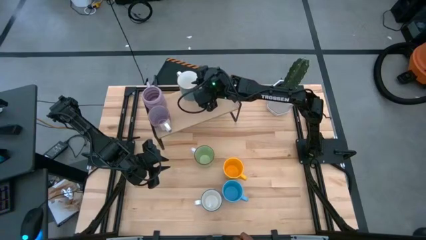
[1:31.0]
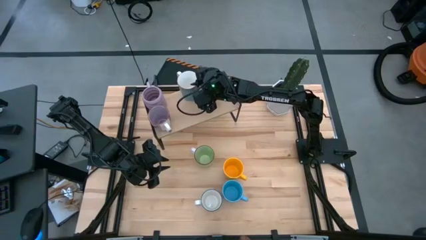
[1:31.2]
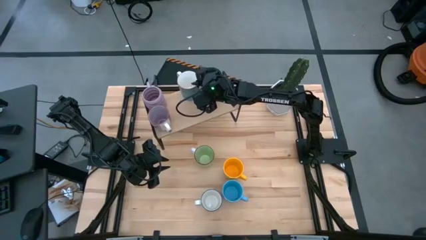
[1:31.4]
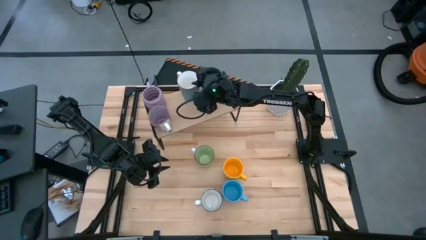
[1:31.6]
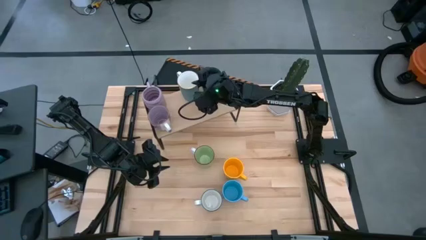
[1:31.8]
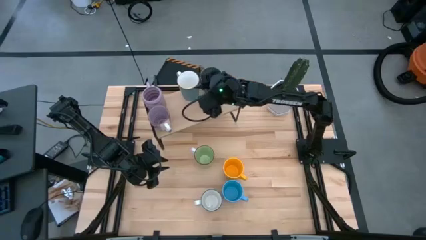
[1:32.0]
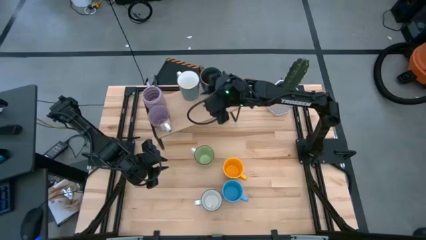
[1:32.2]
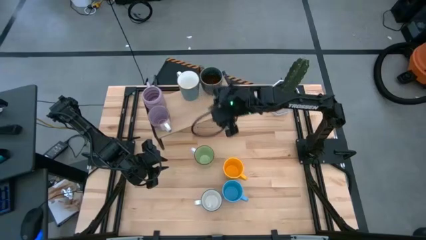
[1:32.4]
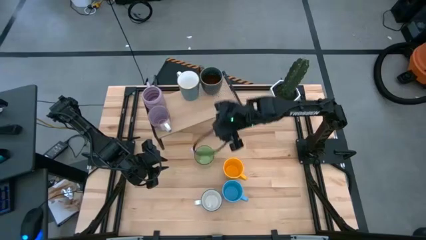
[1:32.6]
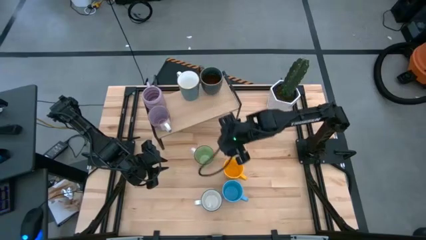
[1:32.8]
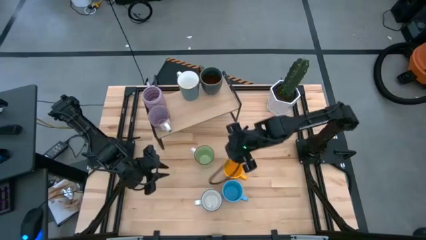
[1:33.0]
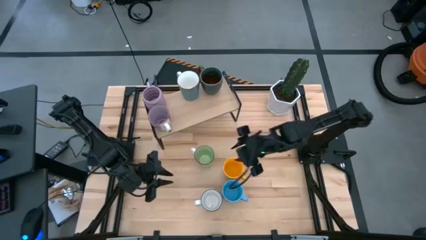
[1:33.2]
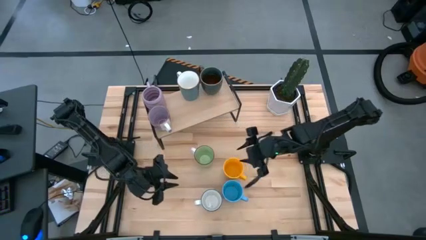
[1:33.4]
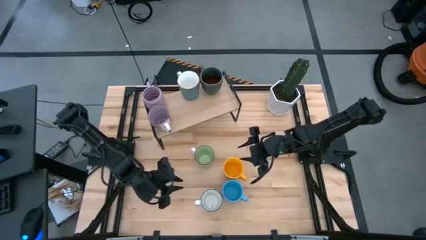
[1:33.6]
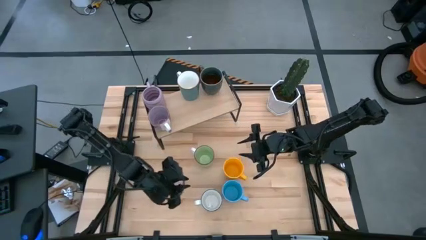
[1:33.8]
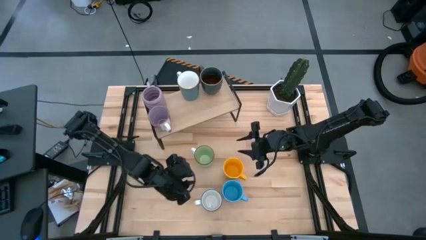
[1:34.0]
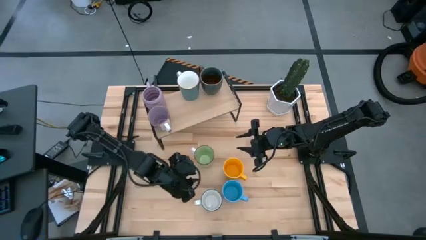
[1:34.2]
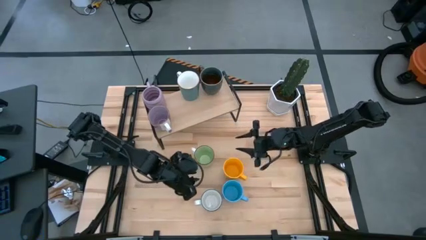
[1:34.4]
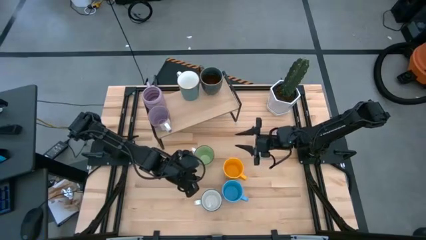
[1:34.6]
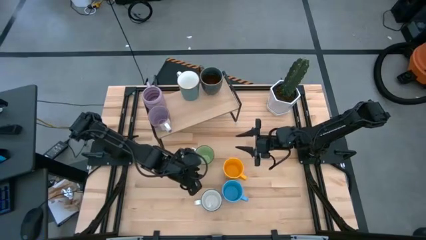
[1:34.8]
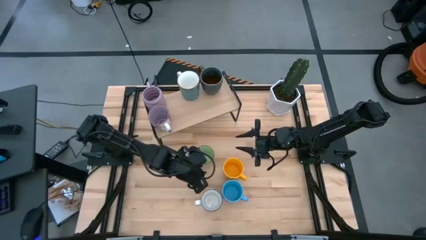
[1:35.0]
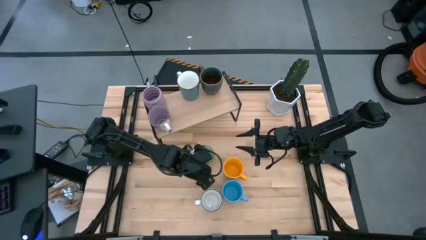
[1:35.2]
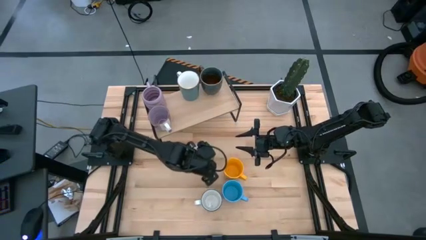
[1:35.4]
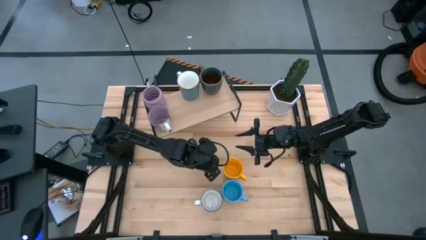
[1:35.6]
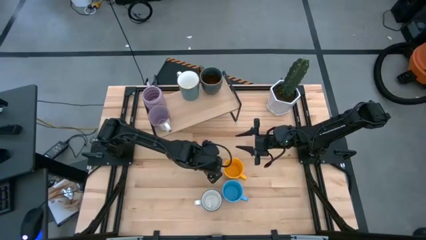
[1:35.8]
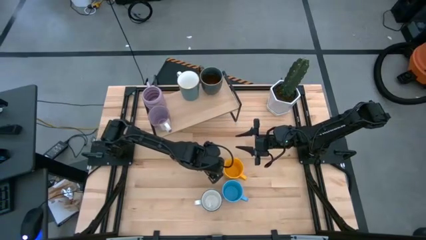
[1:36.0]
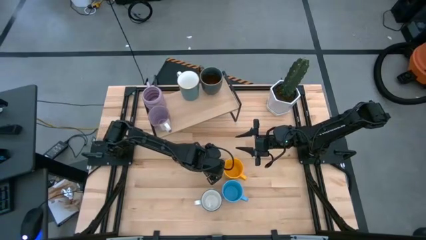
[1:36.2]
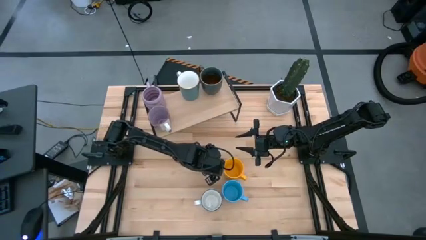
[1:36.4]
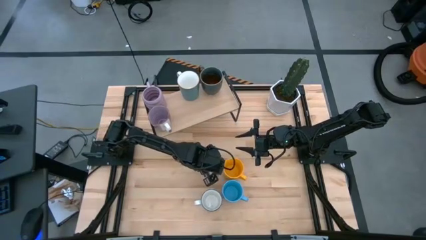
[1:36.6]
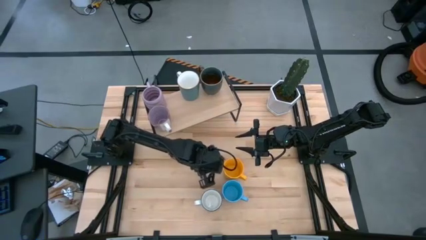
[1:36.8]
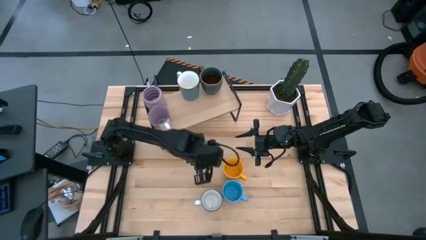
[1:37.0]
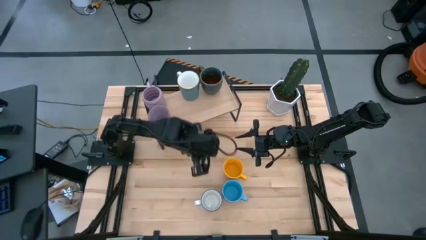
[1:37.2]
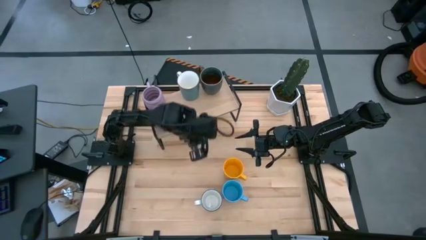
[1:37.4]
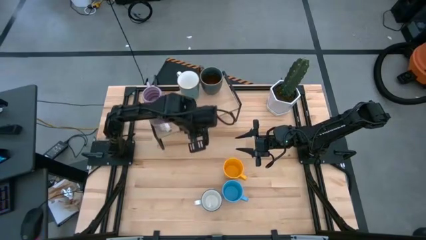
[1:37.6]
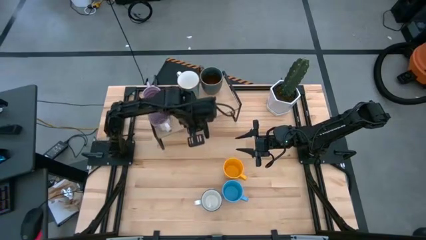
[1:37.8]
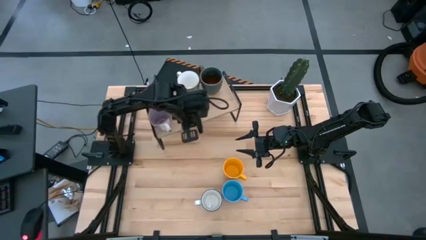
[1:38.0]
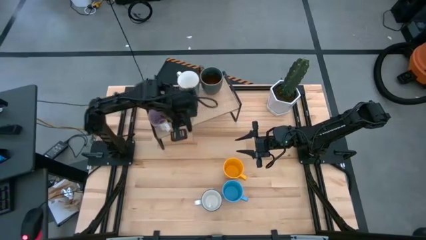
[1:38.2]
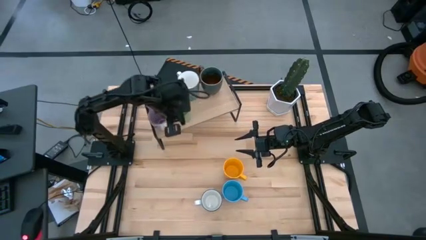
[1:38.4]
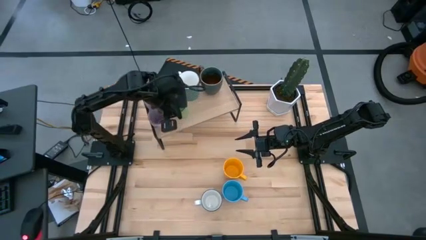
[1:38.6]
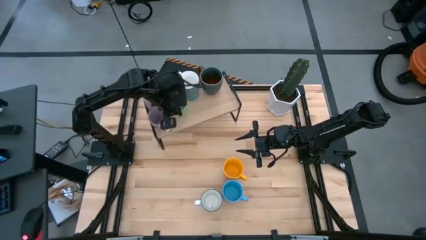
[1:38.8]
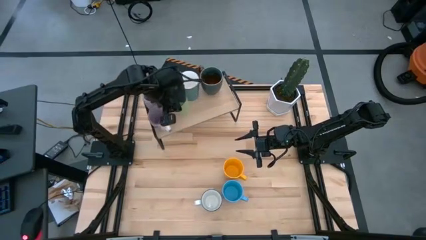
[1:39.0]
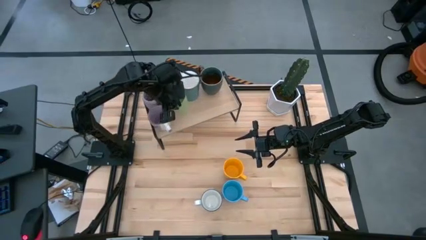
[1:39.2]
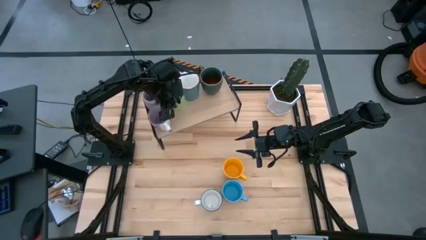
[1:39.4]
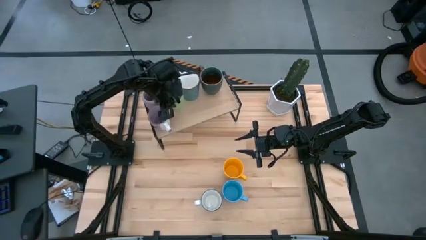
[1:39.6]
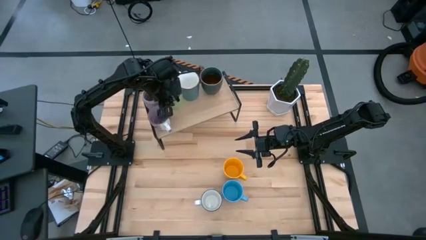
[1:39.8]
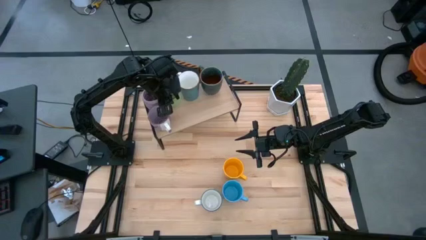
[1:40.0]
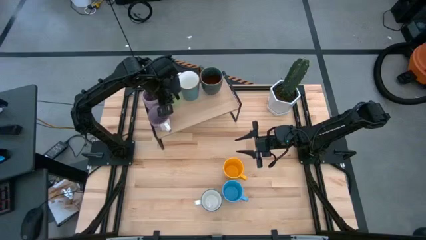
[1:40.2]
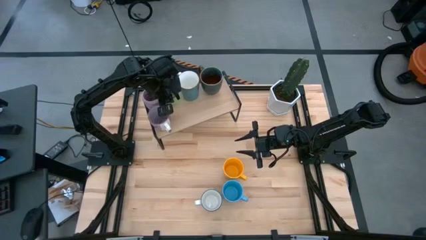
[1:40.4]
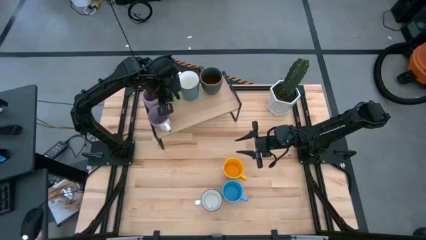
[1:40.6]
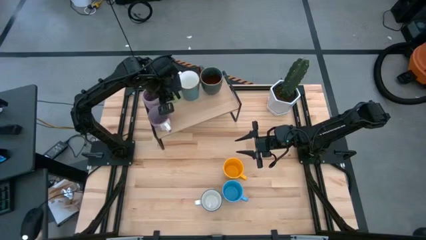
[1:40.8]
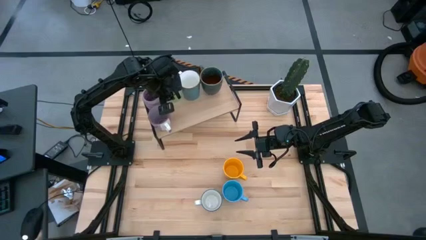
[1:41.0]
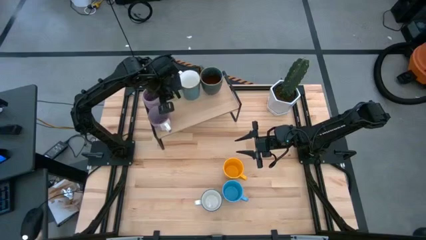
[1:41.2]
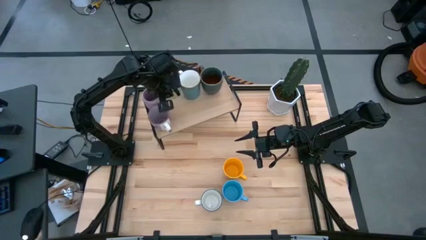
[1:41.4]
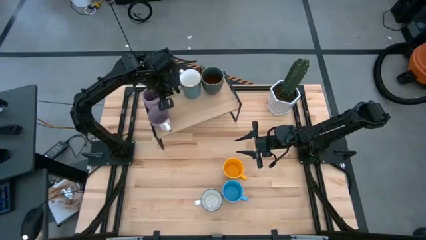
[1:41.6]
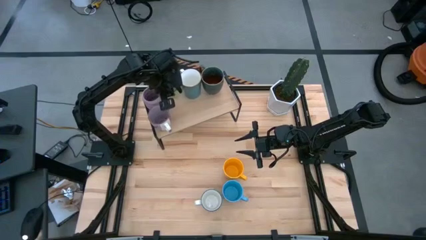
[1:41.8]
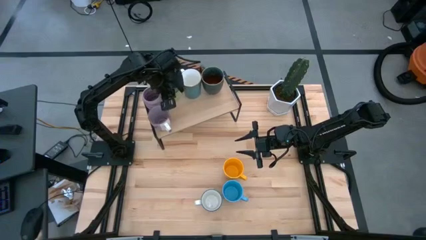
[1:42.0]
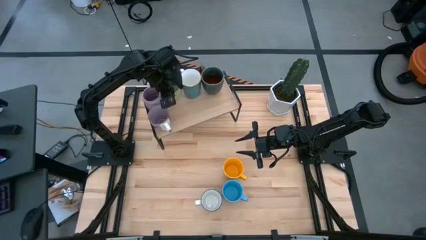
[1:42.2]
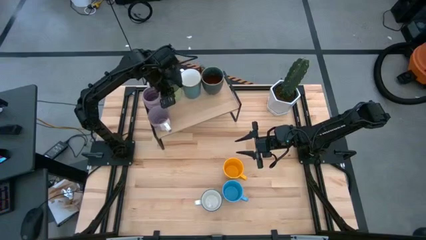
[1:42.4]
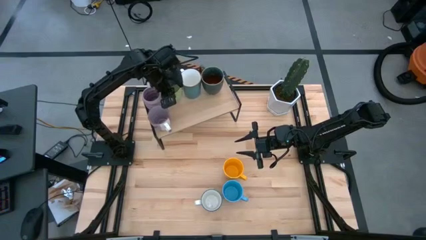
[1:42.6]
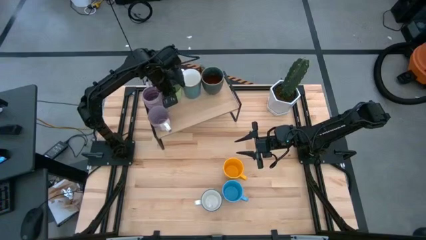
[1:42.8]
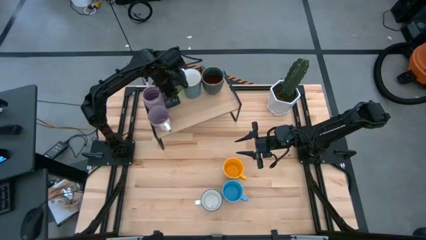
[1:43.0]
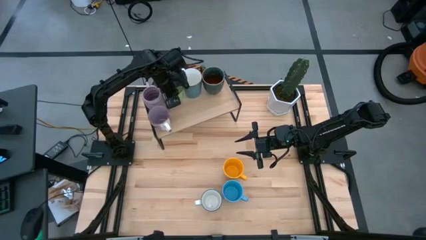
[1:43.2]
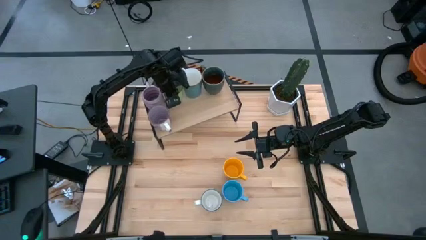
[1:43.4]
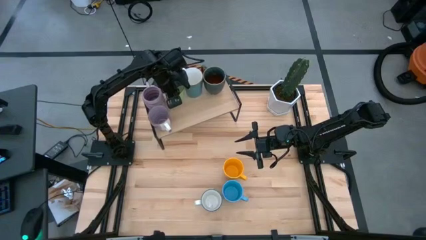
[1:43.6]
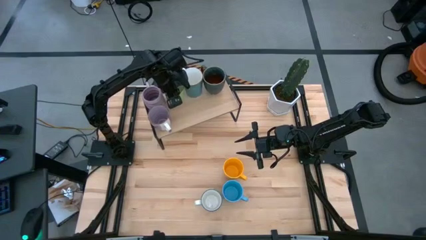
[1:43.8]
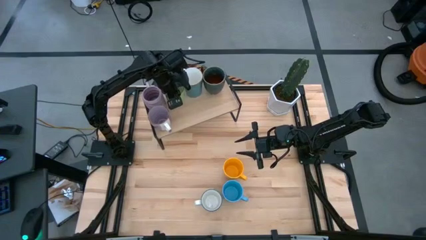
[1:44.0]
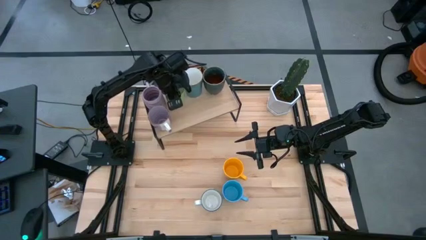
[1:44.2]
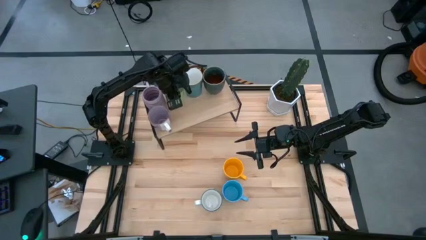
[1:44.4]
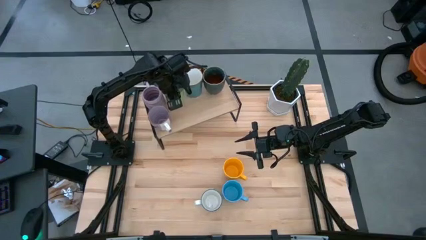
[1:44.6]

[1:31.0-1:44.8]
Task: Place coffee mugs
Put the green mug on the shelf
